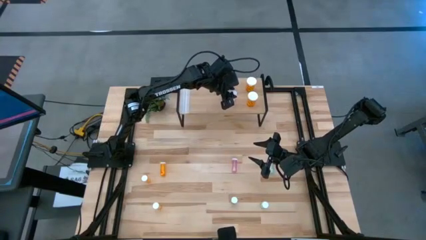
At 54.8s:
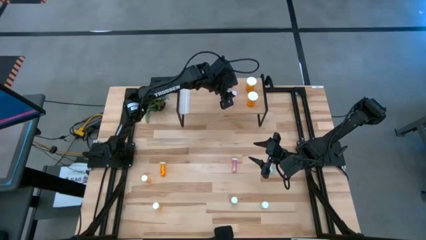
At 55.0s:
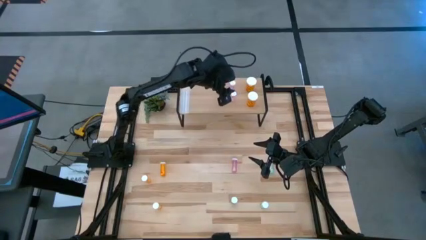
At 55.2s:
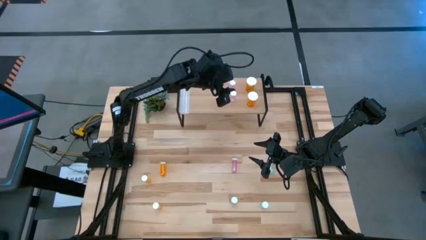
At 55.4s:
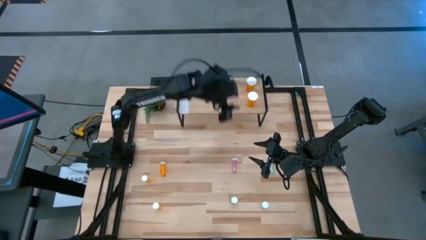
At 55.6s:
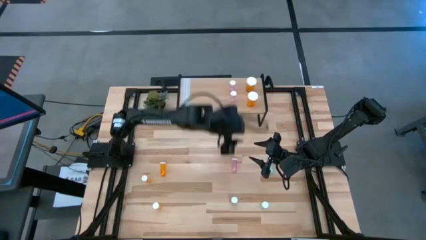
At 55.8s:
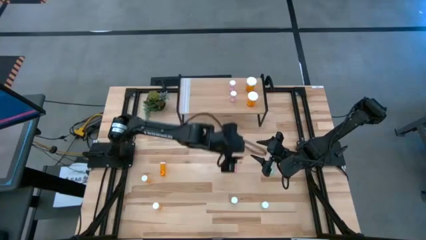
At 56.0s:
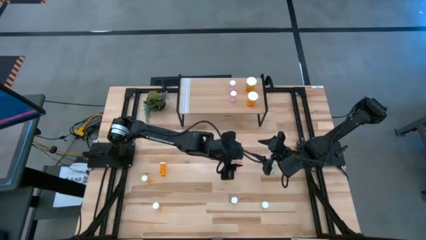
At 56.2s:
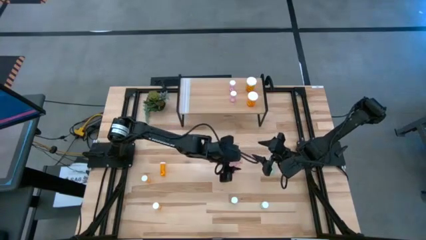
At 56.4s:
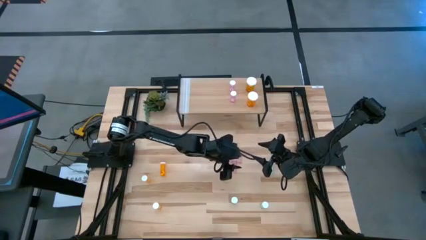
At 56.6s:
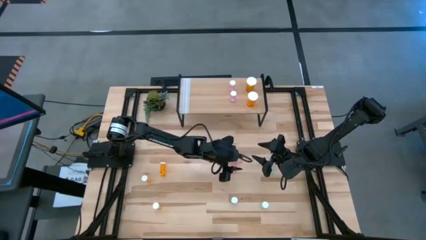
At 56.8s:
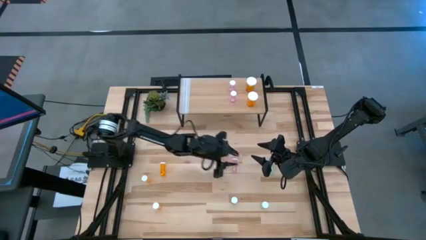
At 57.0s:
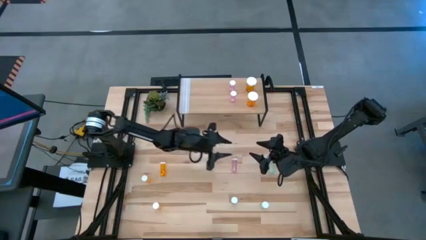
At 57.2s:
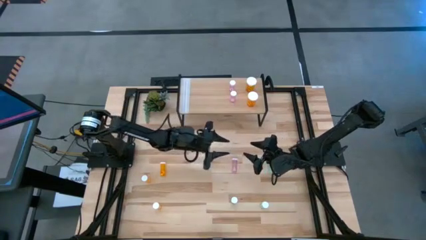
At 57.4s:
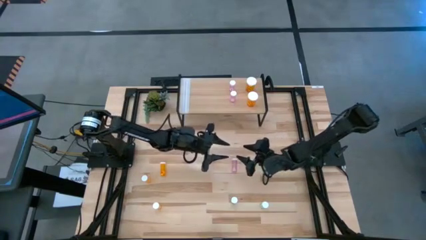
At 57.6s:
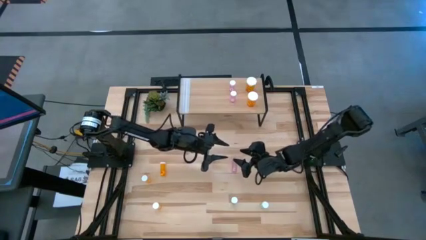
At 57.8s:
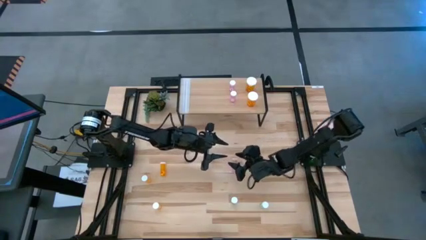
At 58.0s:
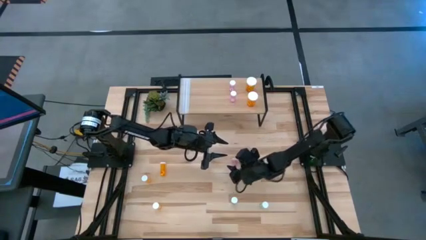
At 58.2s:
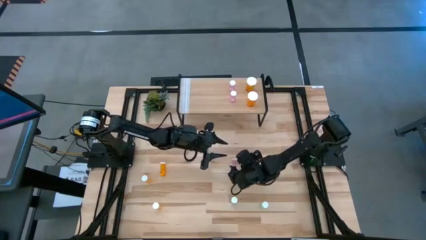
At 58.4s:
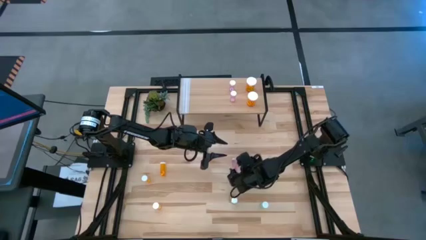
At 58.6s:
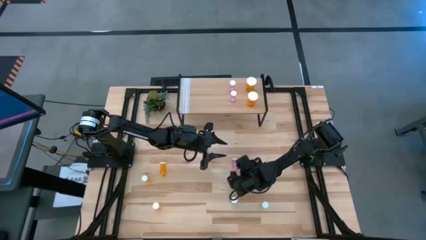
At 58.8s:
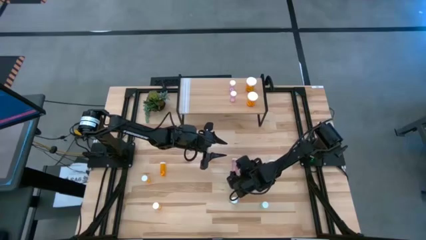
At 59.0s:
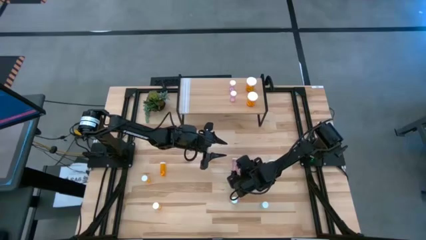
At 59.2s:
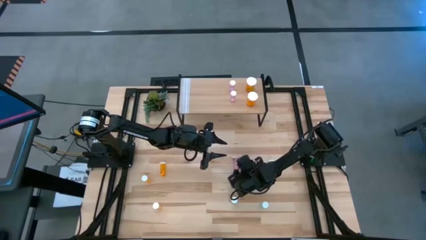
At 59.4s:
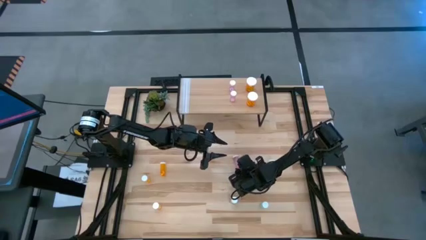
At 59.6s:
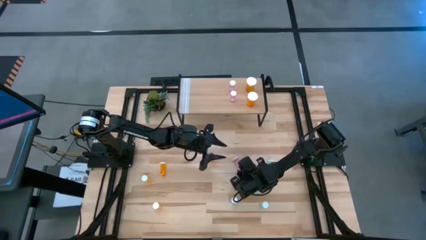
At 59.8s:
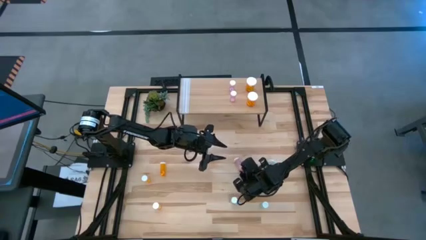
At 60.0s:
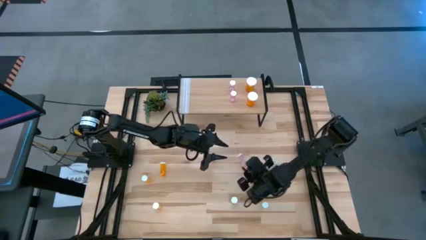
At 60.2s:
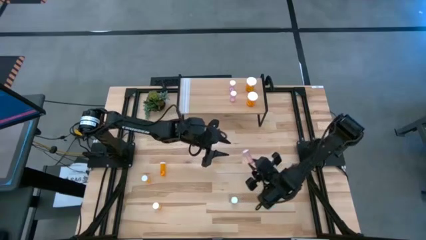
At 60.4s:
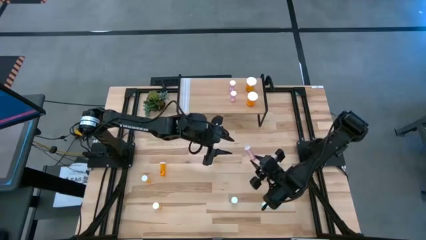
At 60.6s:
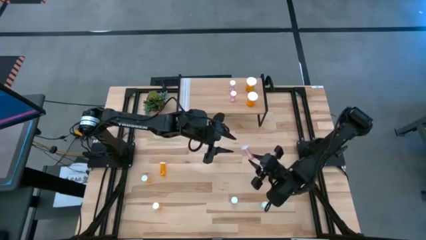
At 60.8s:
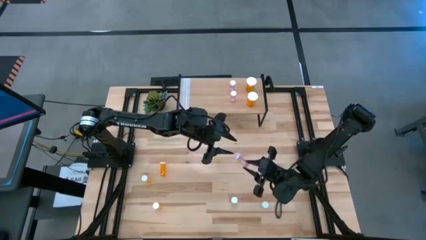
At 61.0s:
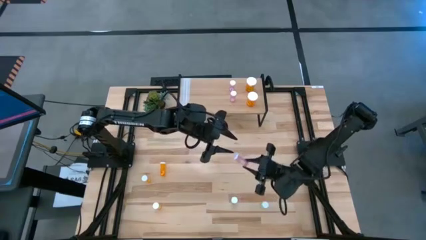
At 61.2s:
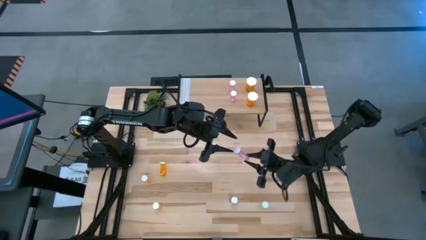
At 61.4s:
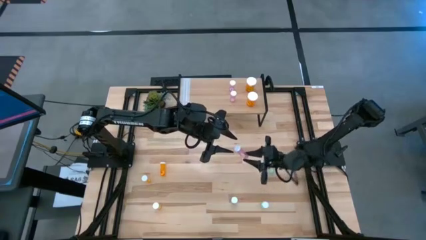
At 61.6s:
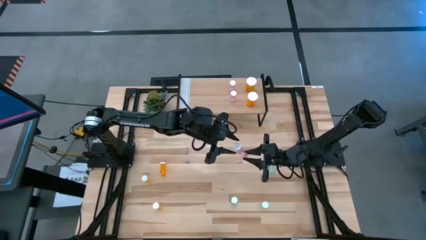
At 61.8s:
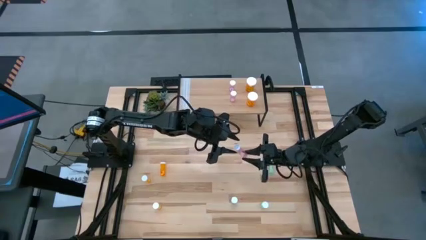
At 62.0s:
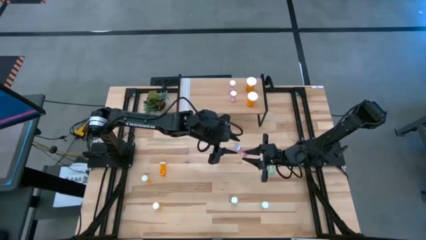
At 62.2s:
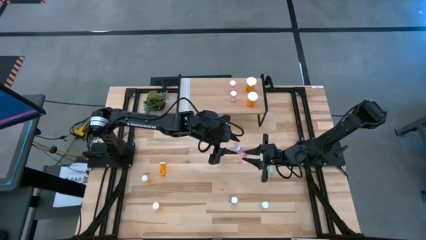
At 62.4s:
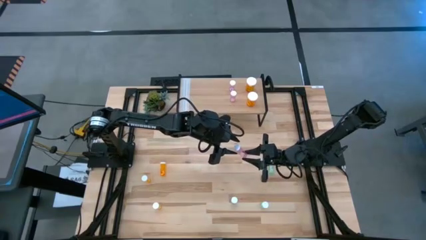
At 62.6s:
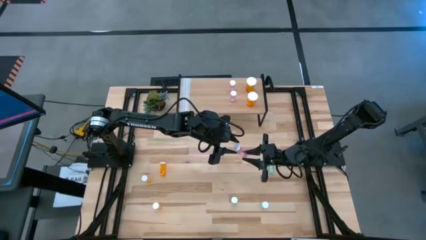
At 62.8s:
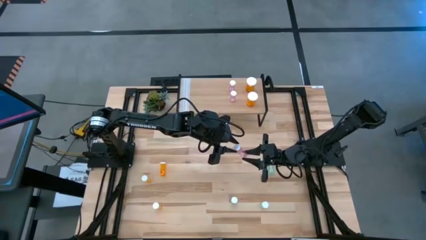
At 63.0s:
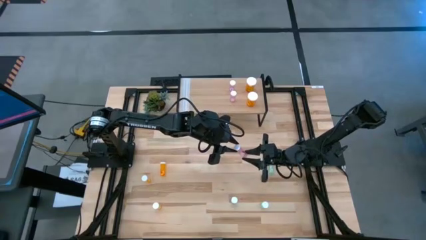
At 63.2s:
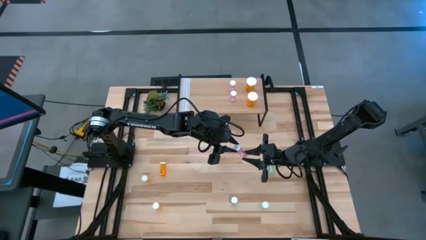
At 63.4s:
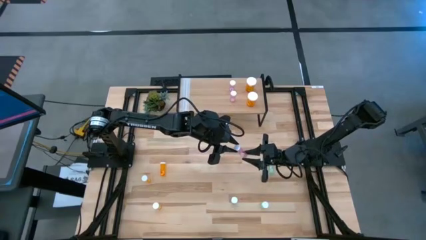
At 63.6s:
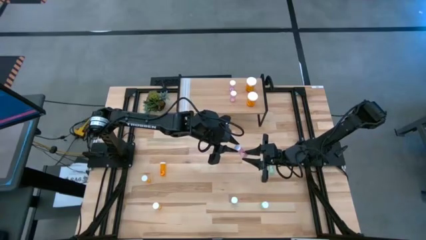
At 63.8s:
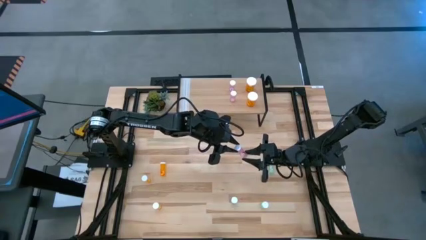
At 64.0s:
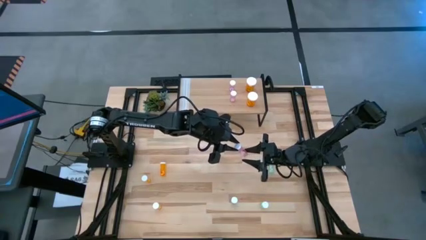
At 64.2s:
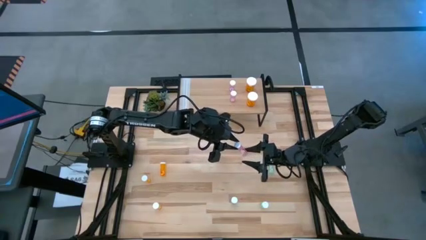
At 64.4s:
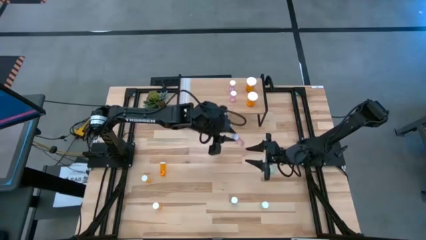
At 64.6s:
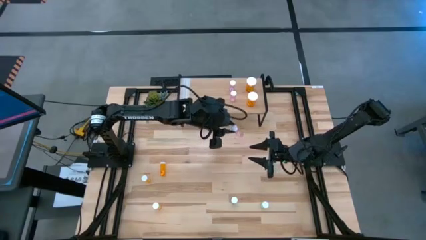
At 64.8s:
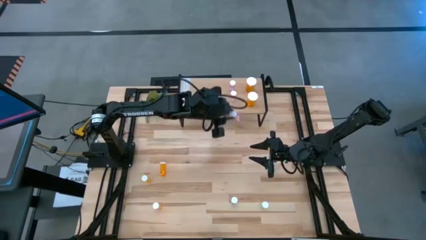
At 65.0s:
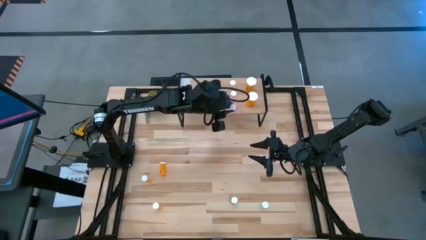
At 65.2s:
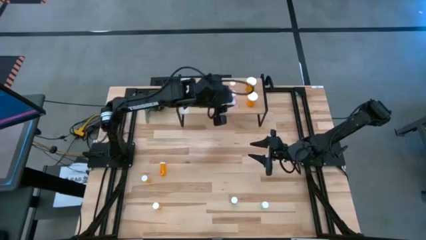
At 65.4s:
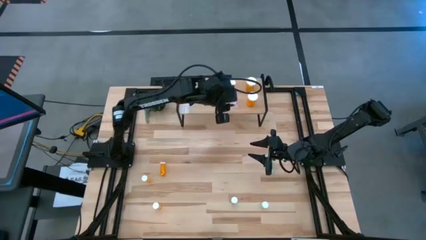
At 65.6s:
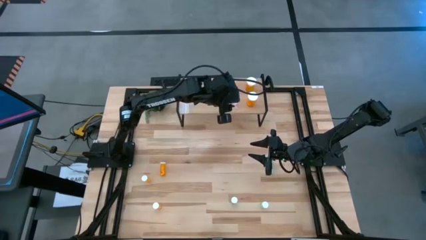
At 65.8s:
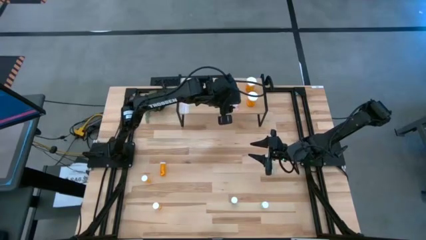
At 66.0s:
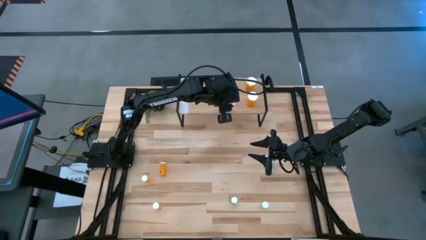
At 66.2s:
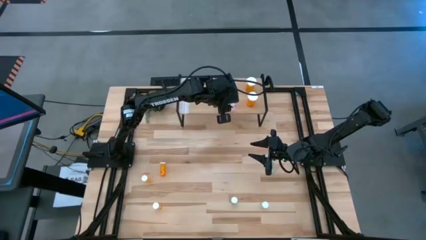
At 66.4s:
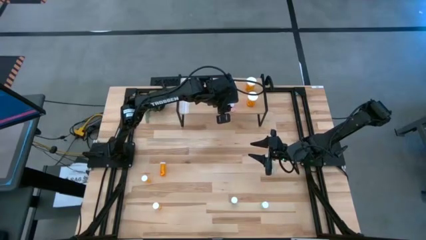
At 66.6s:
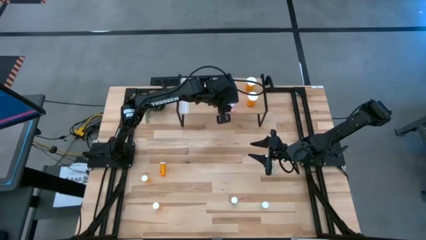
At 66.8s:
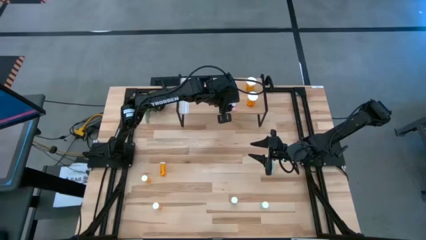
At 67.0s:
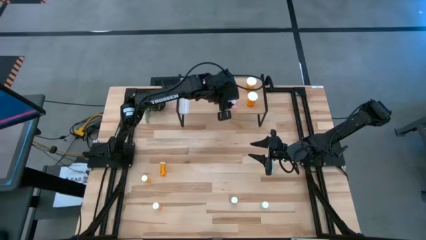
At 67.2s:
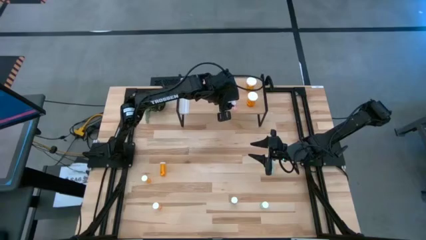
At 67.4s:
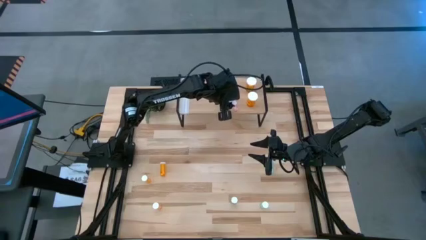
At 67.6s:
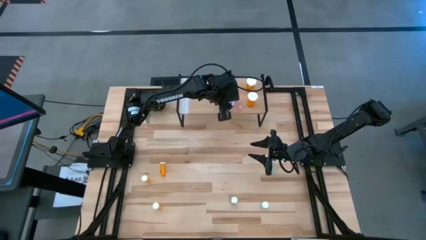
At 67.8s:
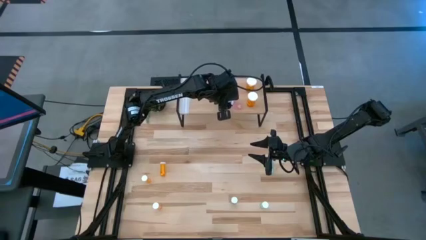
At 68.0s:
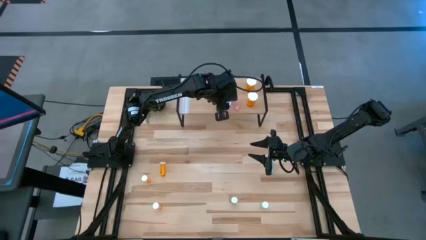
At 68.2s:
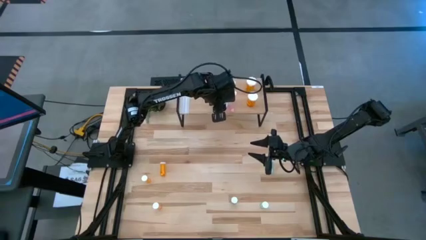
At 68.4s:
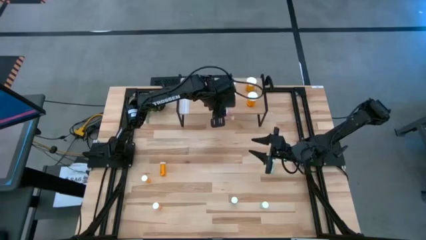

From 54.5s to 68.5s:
Task: Pick and place medicine bottles onto shelf by color
Put the pink pill bottle on the shelf aligned with the other pink pill bottles
